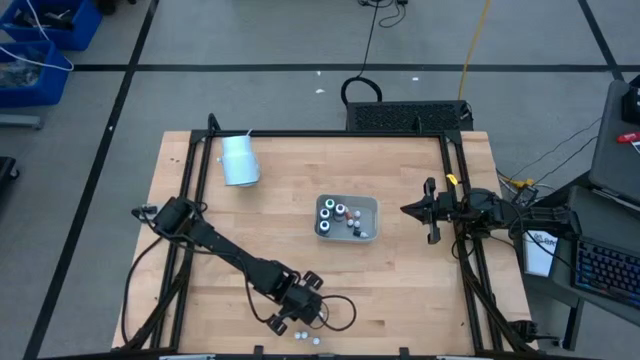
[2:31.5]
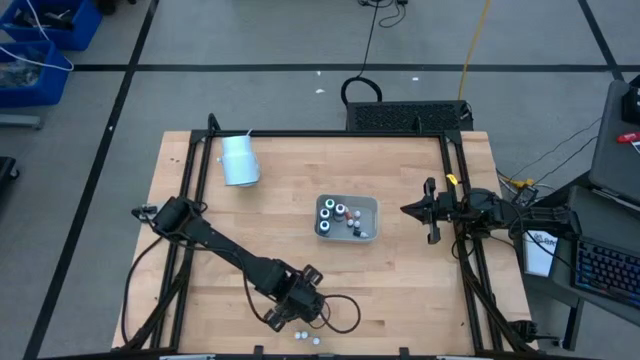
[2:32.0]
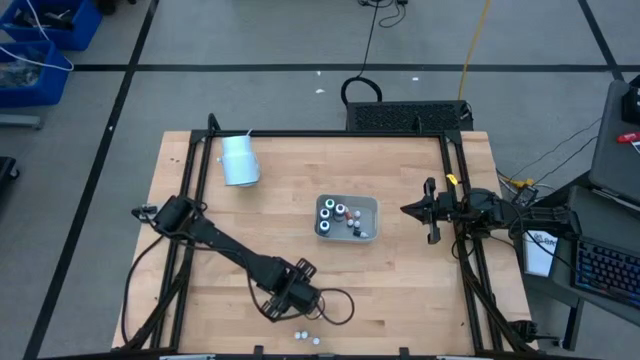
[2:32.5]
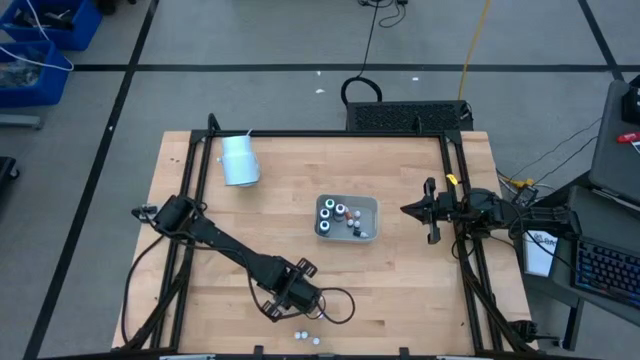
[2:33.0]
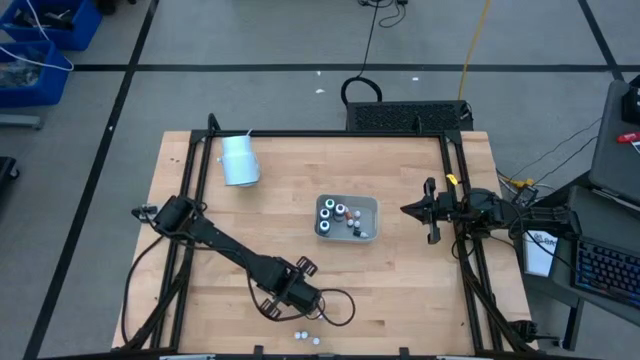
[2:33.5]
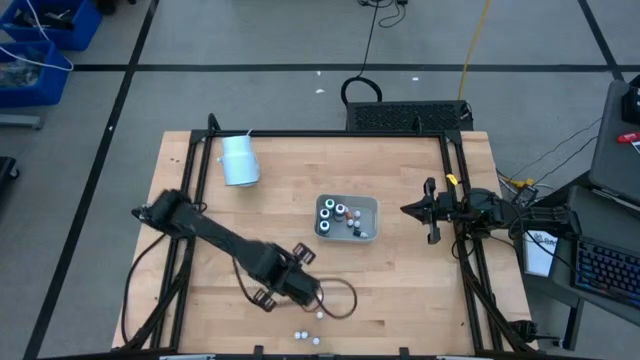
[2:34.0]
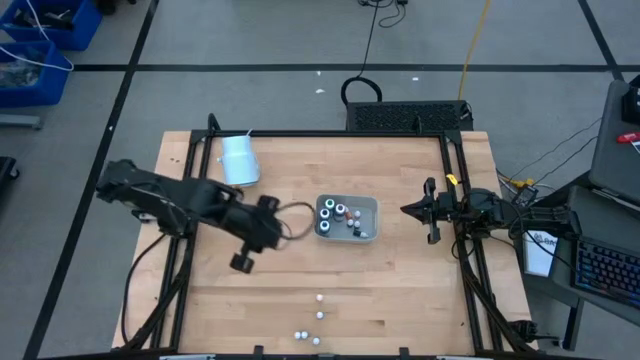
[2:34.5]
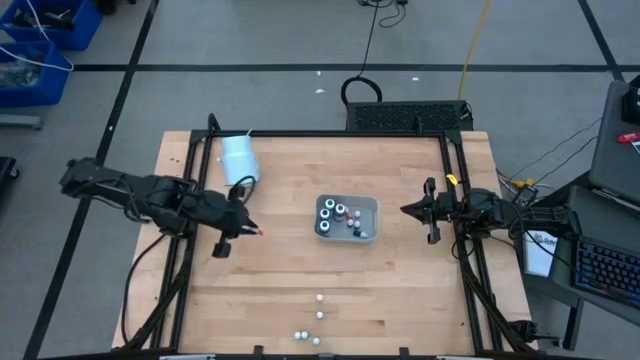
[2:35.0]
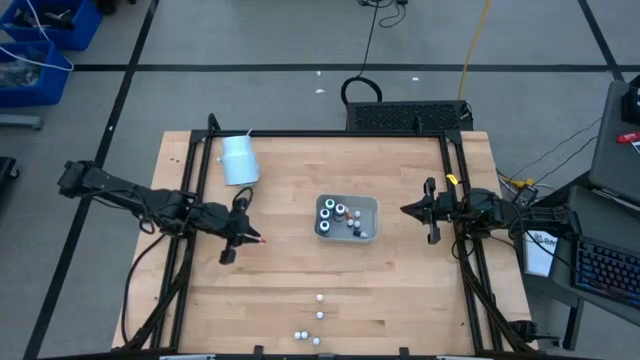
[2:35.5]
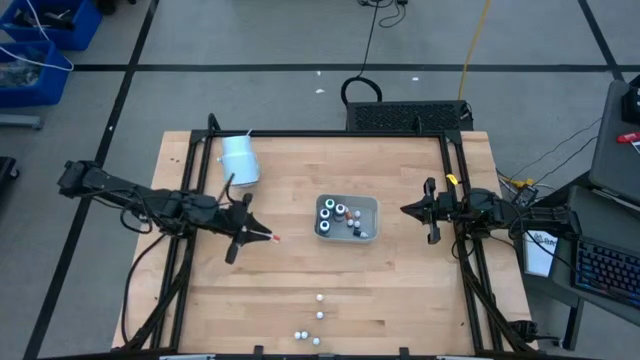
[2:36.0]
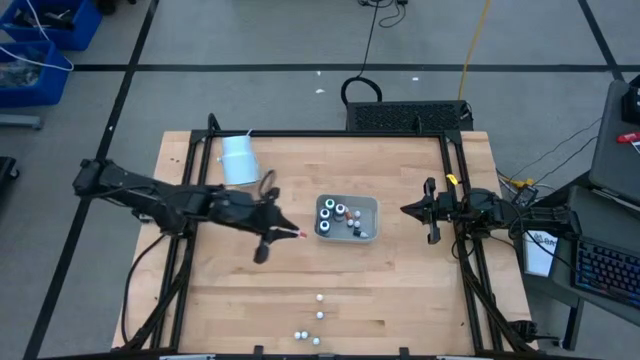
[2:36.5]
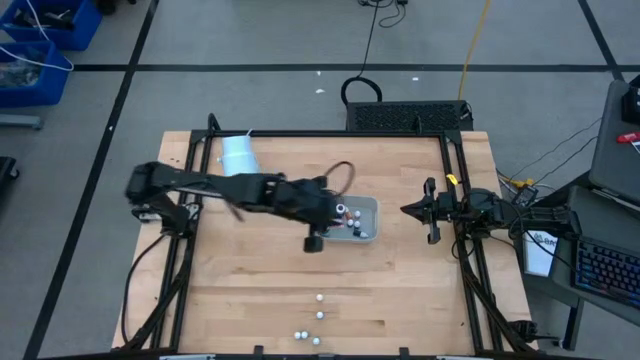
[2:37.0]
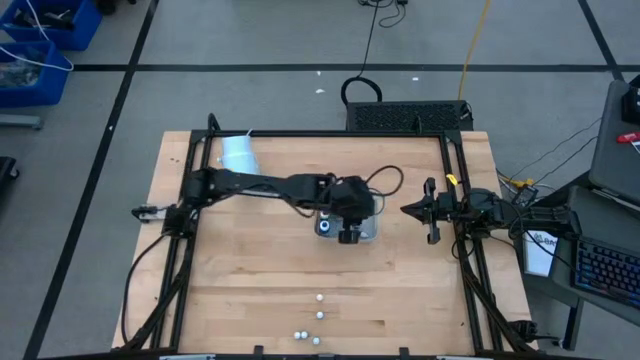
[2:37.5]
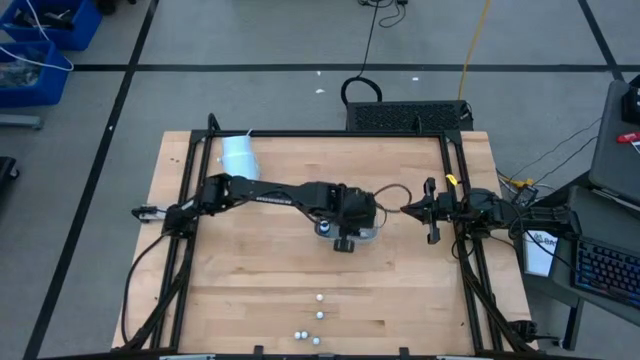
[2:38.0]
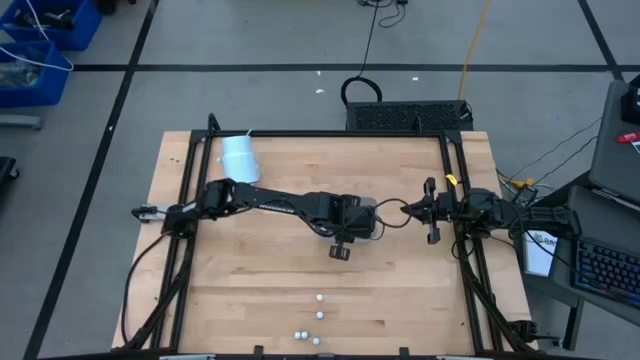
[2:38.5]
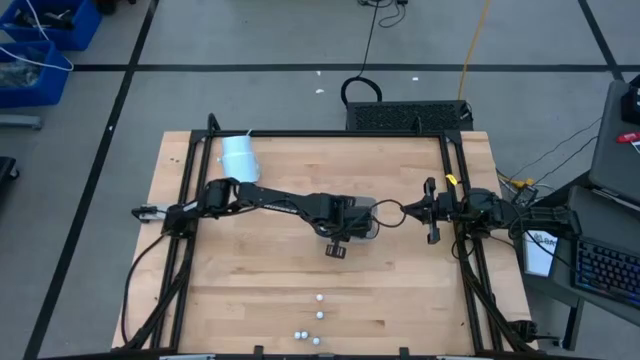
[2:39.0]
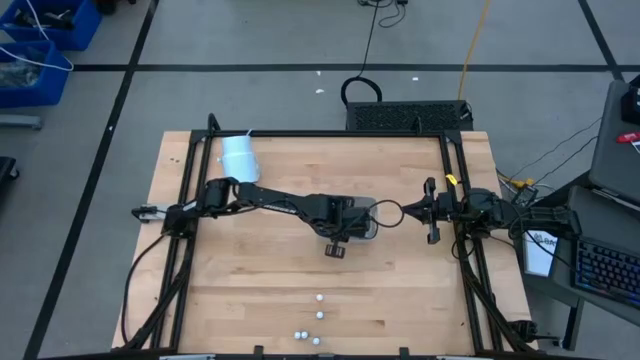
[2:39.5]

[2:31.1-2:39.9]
Task: Pick & Place food coloring
Put the bottom orange food coloring bottle into the bin

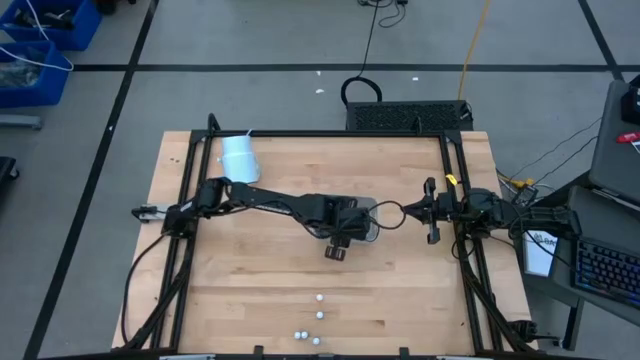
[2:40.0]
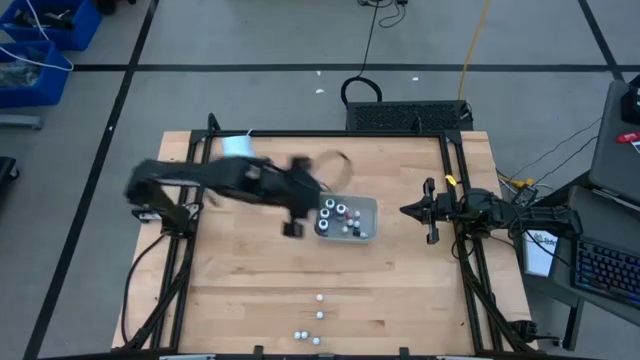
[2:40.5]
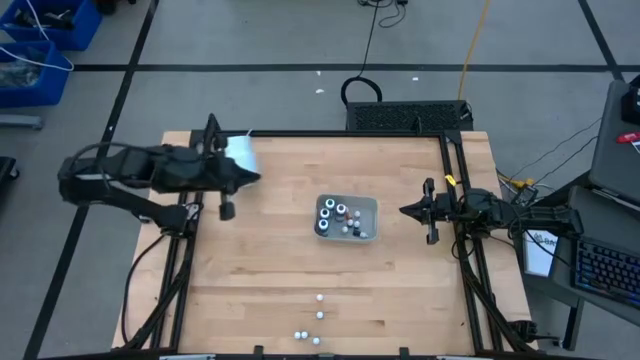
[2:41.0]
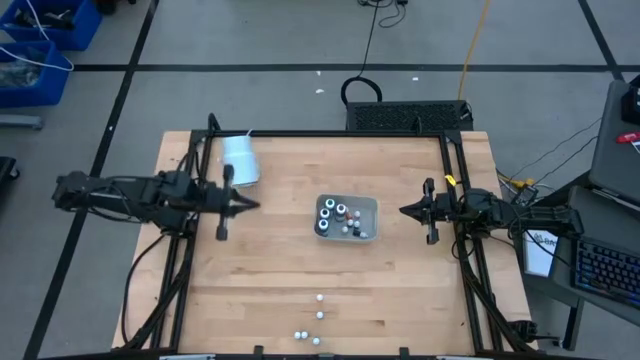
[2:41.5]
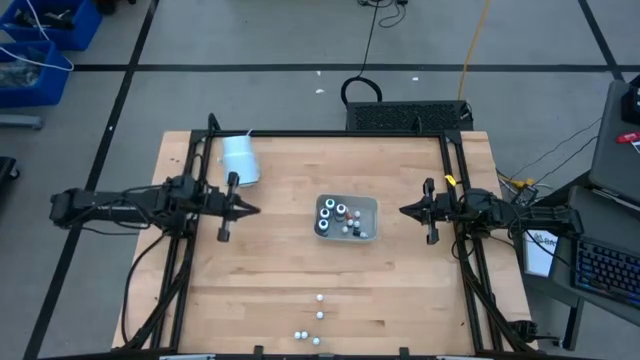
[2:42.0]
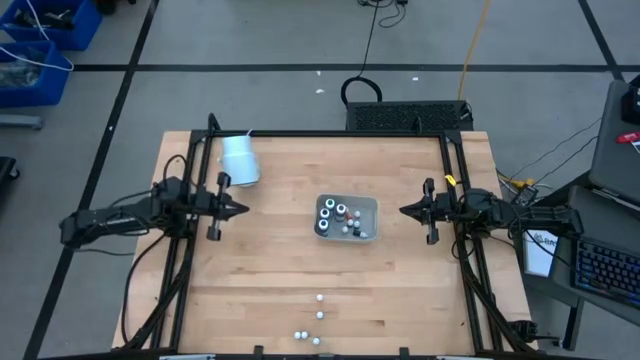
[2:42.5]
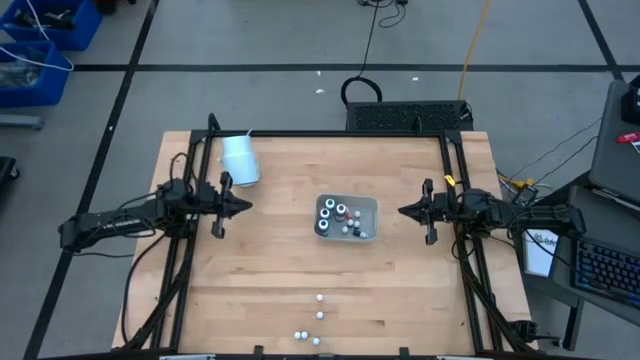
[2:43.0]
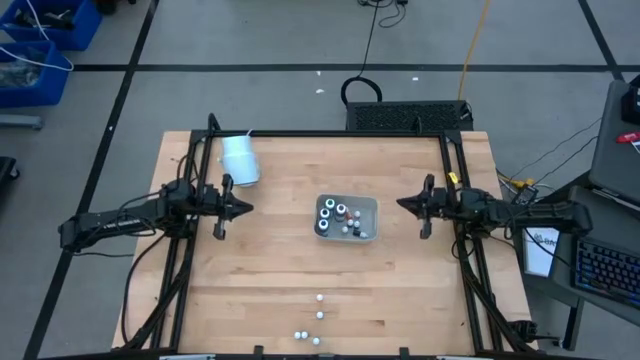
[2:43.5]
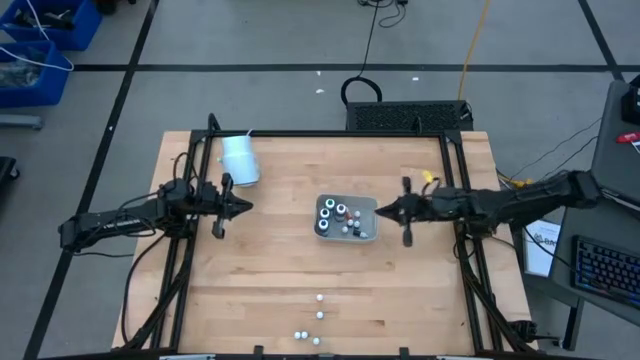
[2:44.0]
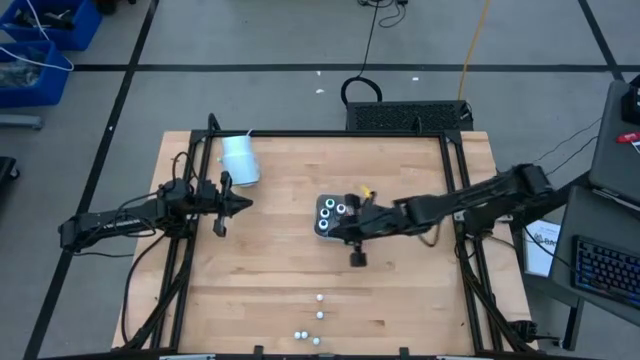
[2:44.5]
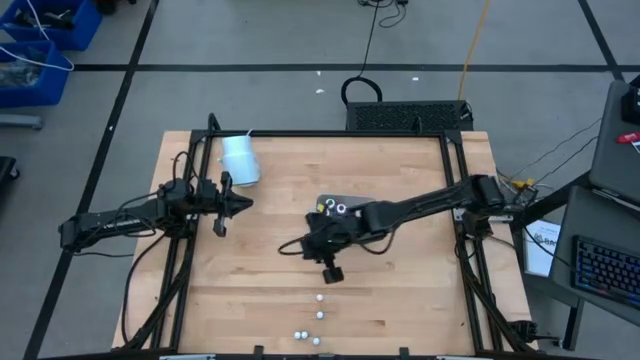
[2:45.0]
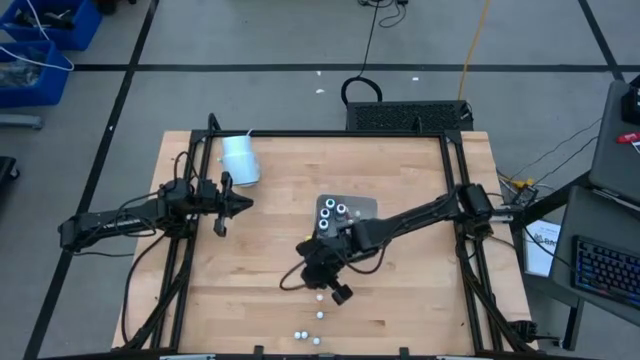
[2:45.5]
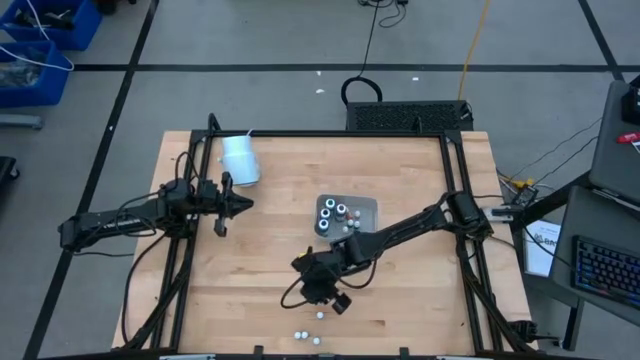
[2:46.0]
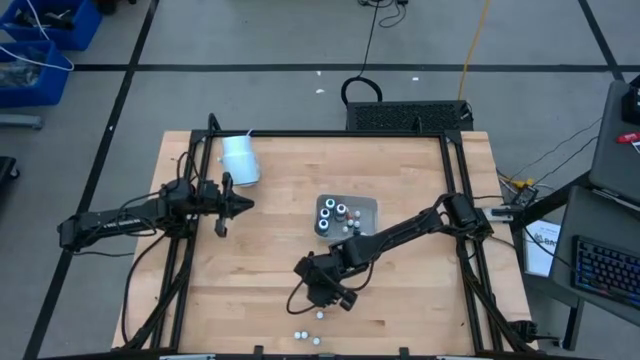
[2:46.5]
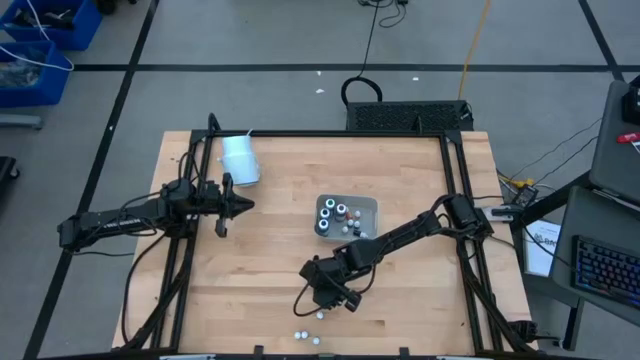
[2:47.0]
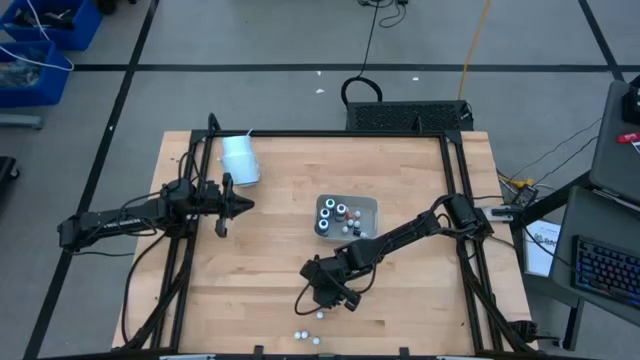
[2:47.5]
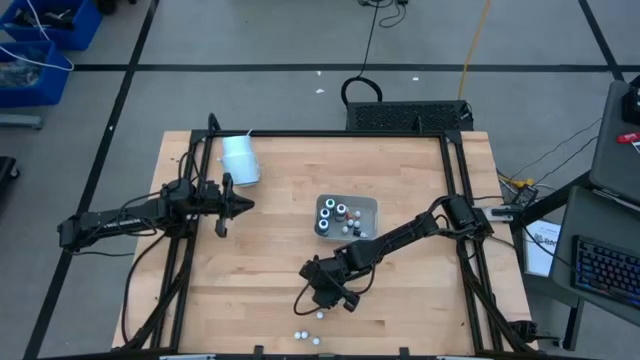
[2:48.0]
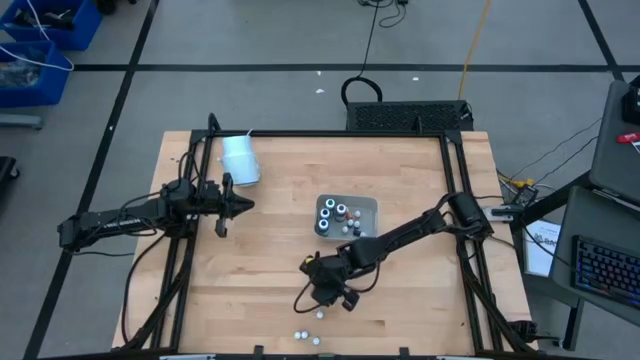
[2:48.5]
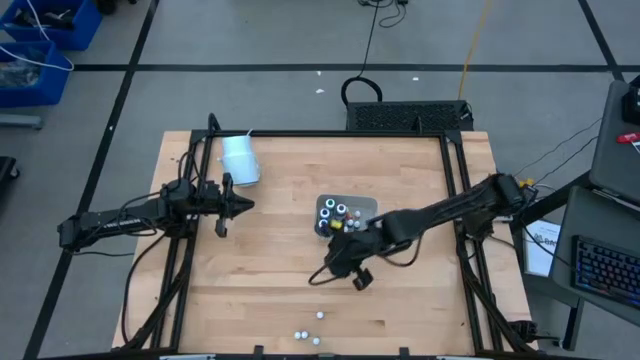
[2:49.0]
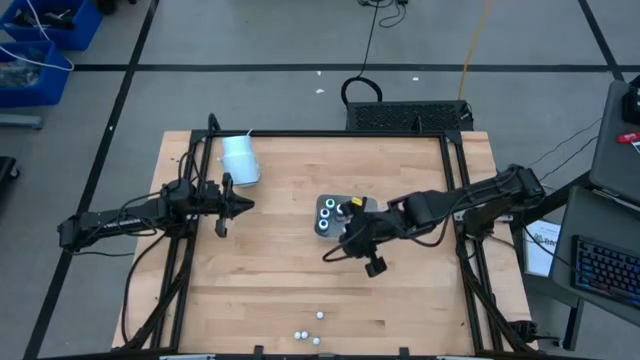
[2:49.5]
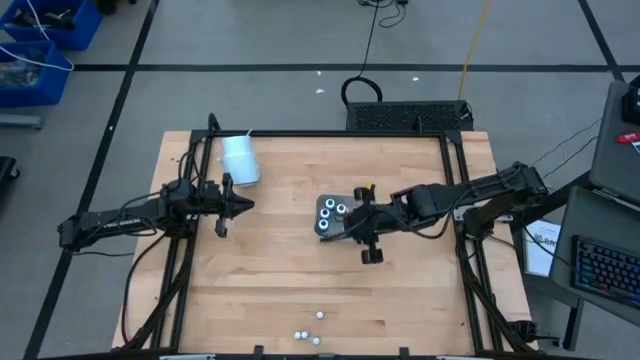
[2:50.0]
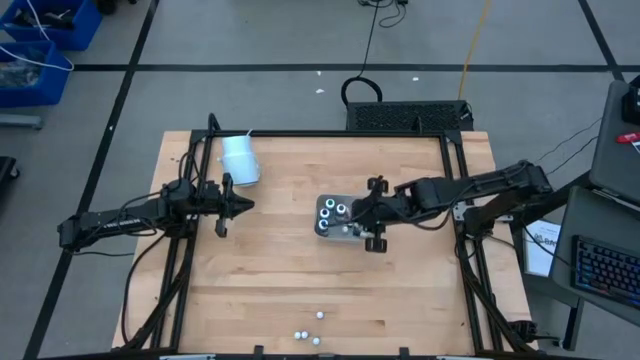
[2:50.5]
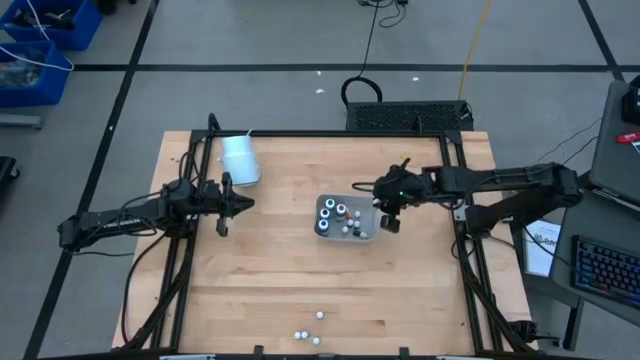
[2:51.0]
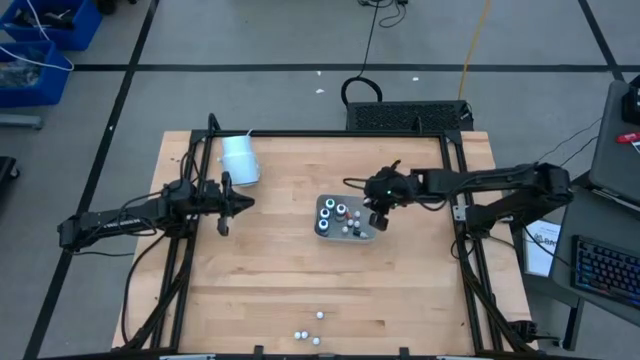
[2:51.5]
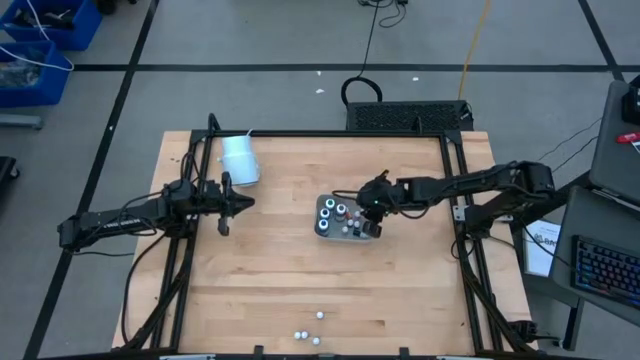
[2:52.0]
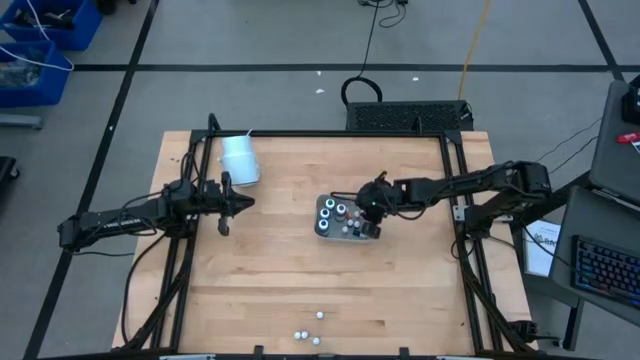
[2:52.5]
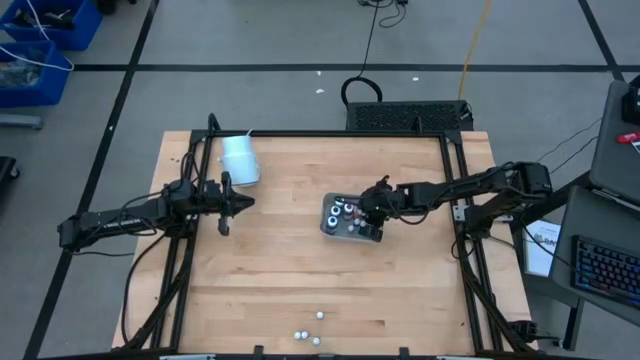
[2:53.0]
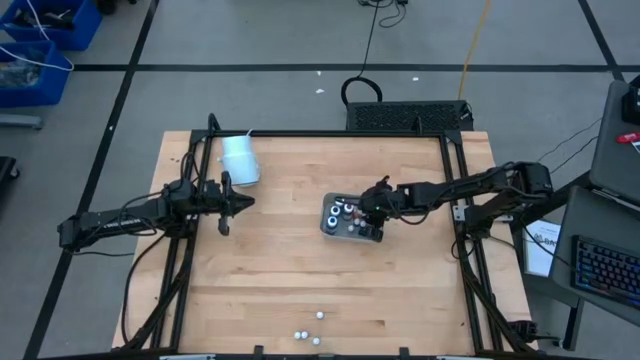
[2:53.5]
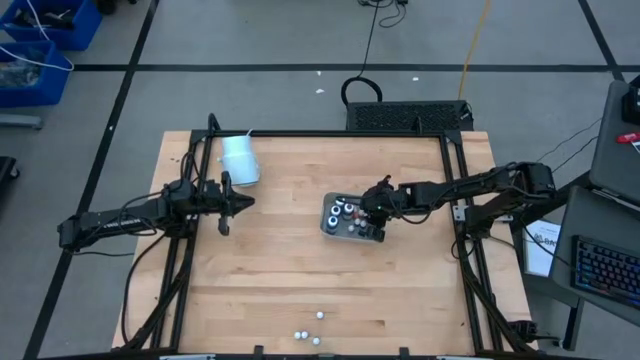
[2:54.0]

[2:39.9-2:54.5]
Put the orange food coloring bottle into the bin
